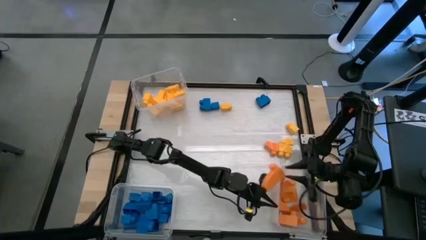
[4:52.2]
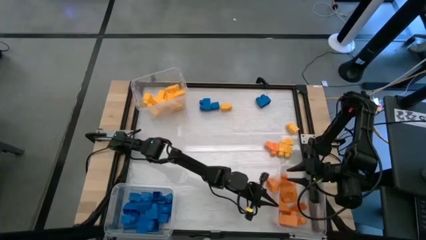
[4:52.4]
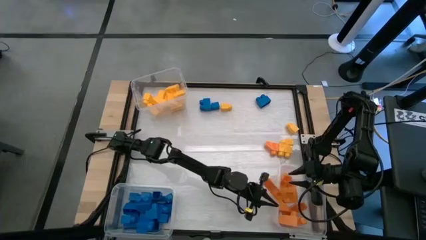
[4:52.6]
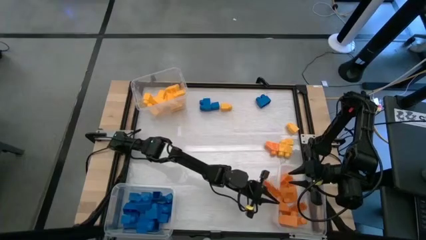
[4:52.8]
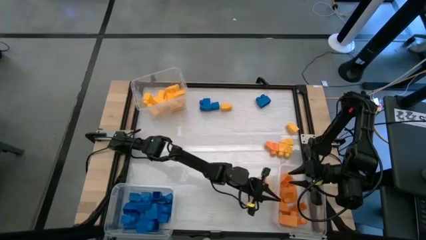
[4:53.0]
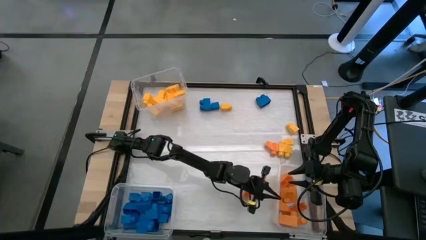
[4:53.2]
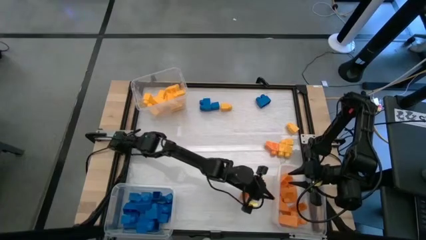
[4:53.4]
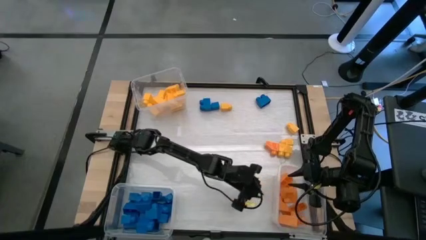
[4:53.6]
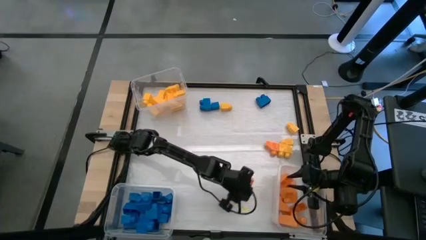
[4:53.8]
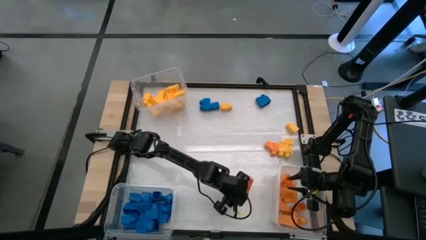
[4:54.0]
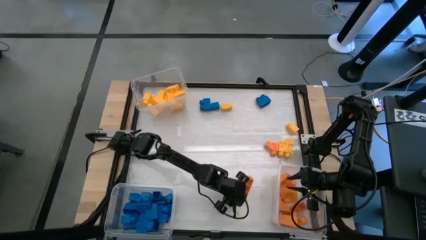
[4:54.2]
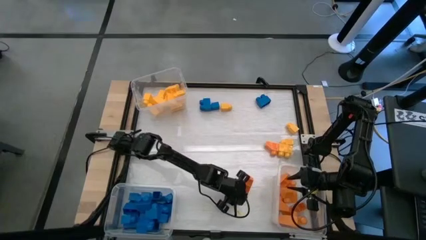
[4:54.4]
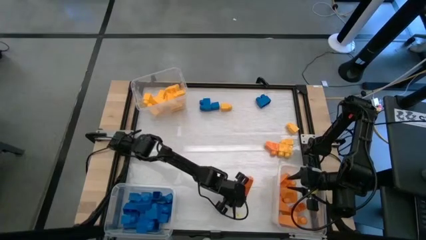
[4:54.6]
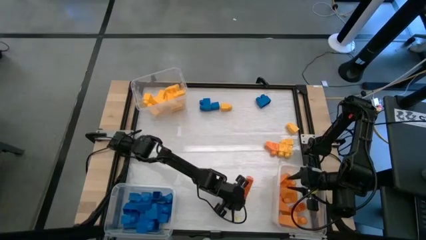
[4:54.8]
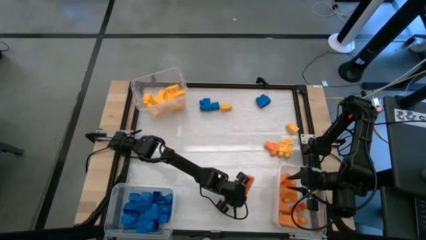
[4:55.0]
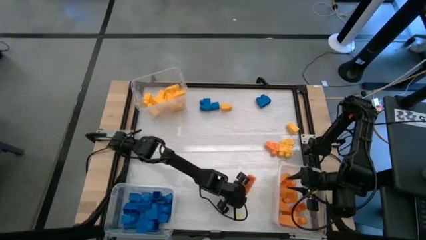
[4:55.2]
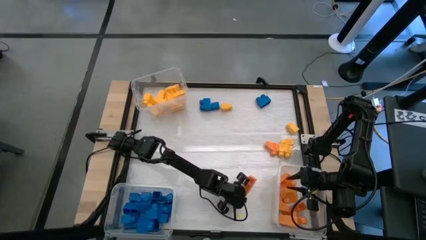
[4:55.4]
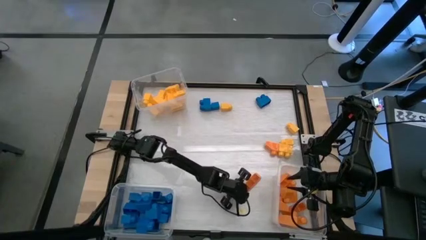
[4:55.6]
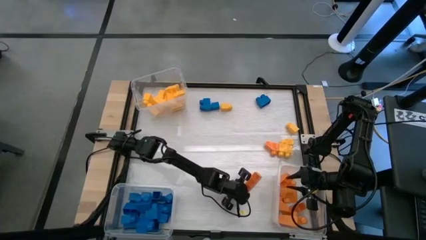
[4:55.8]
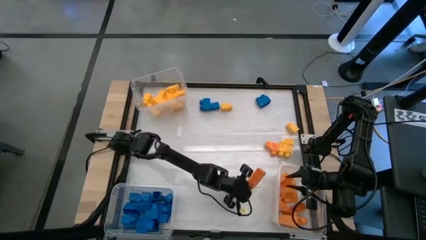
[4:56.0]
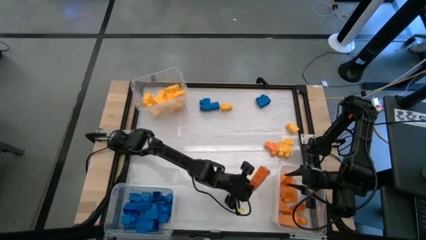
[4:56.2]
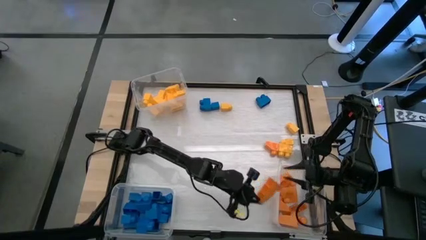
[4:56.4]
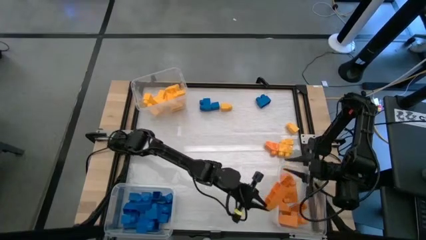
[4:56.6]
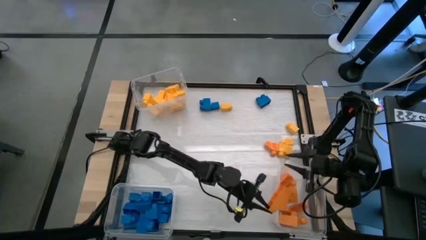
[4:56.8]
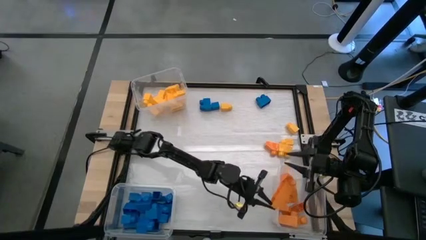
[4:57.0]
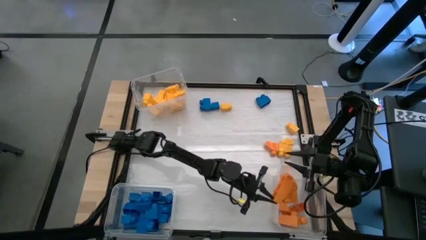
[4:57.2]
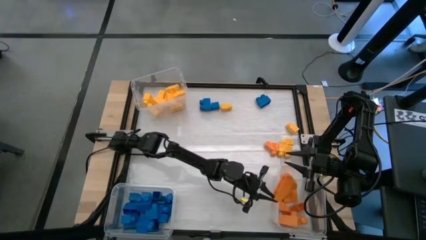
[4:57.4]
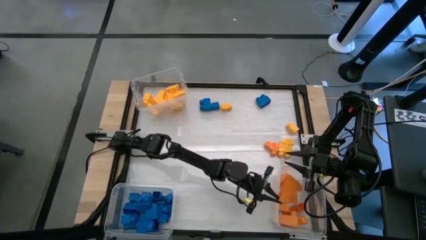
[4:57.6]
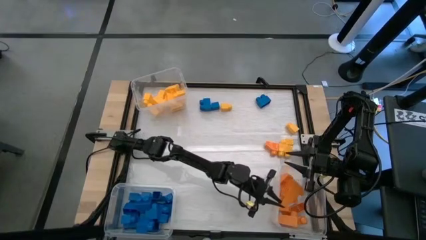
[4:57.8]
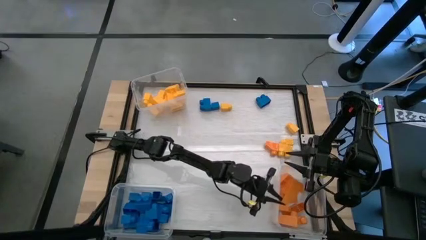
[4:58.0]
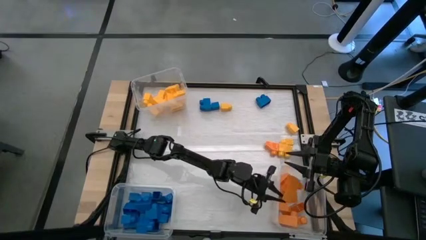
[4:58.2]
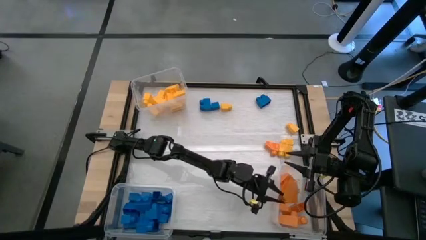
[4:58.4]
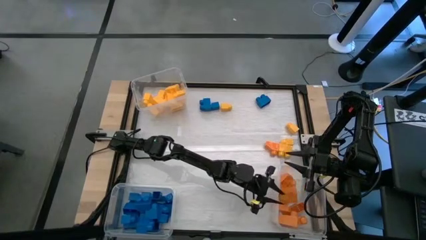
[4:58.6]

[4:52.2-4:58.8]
Task: Sort blocks
Put the orange game piece into the bottom right transparent bin

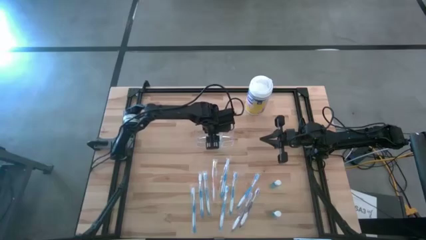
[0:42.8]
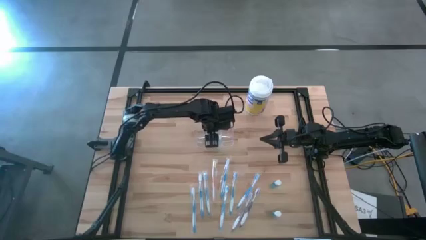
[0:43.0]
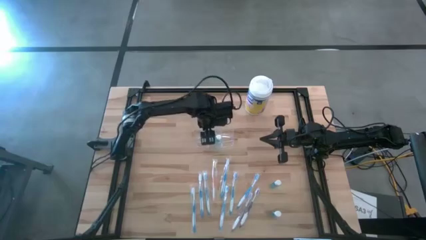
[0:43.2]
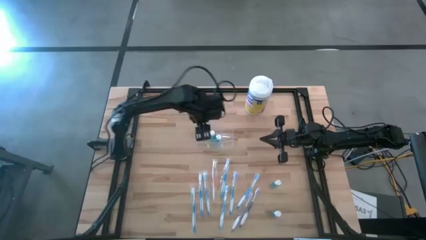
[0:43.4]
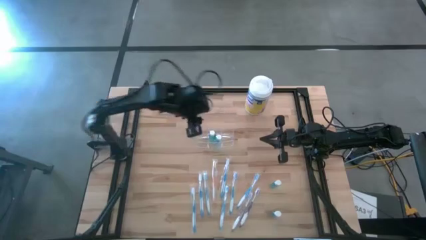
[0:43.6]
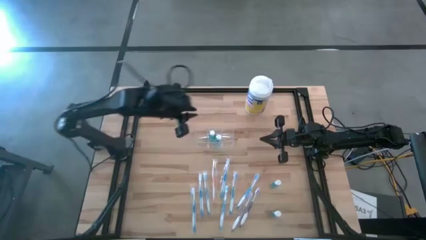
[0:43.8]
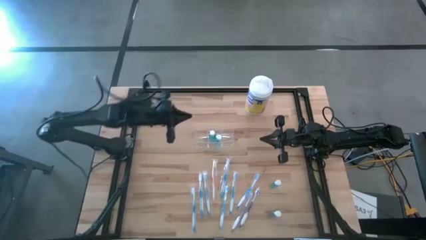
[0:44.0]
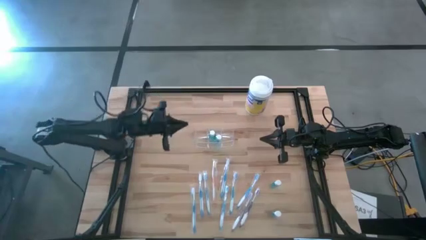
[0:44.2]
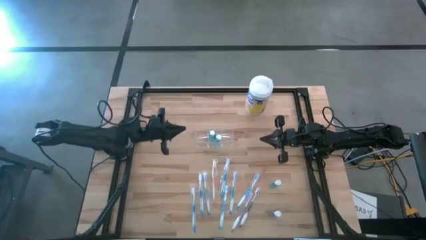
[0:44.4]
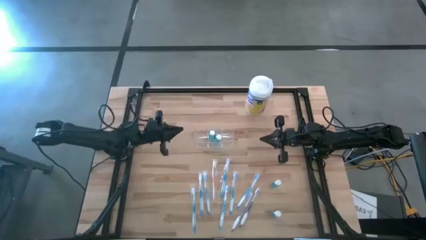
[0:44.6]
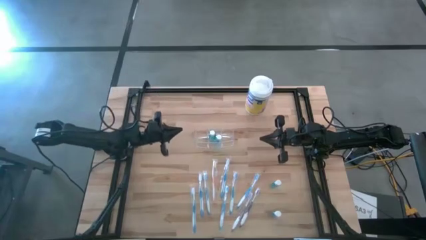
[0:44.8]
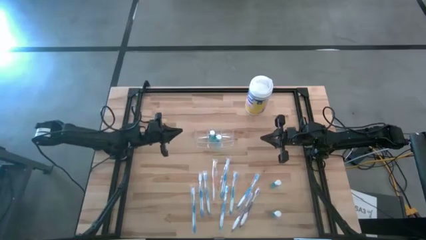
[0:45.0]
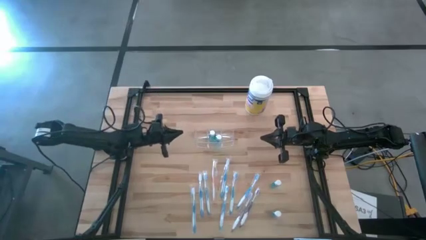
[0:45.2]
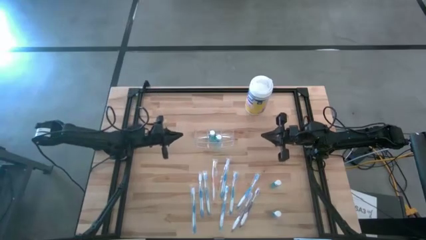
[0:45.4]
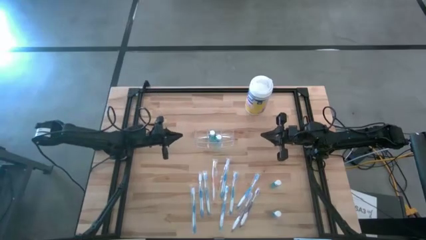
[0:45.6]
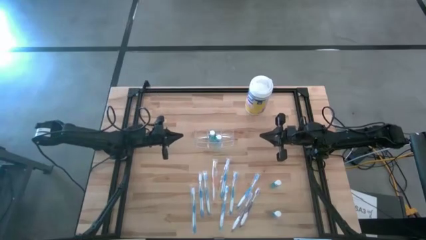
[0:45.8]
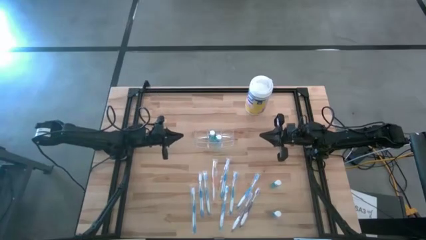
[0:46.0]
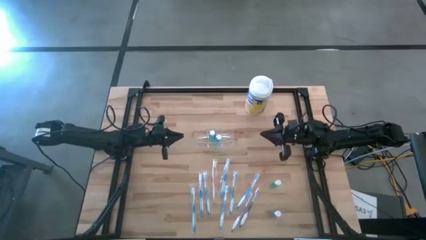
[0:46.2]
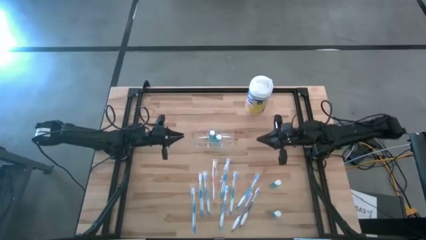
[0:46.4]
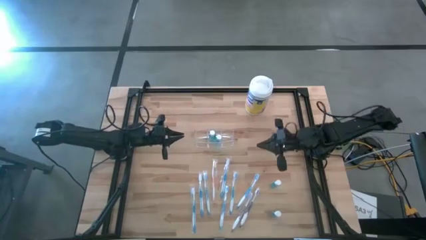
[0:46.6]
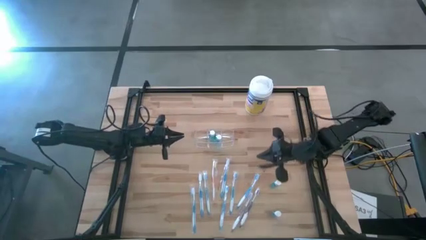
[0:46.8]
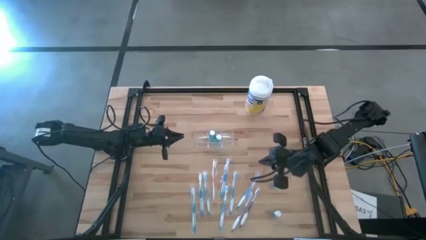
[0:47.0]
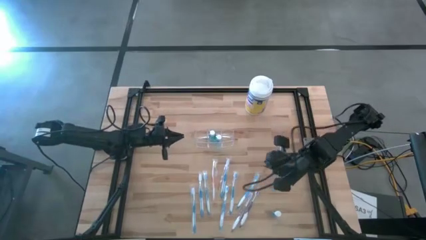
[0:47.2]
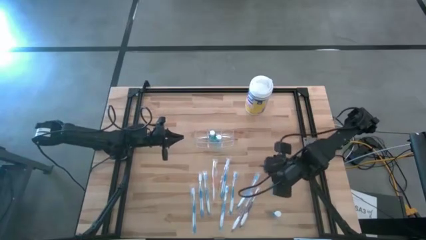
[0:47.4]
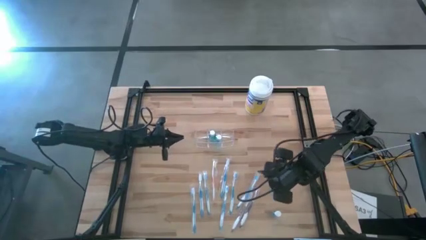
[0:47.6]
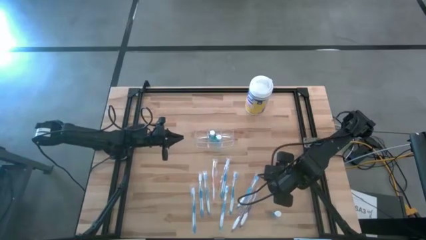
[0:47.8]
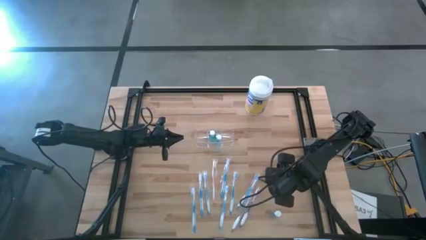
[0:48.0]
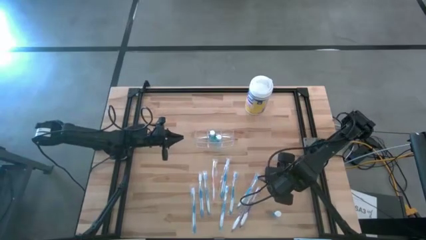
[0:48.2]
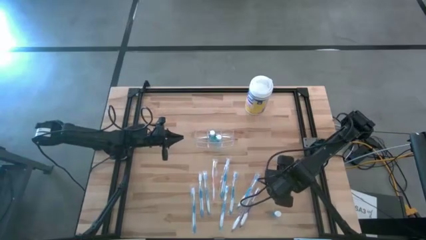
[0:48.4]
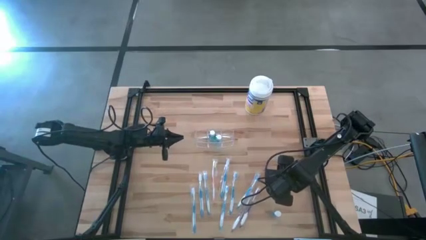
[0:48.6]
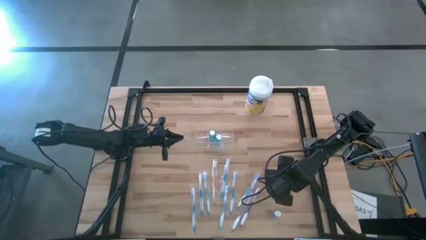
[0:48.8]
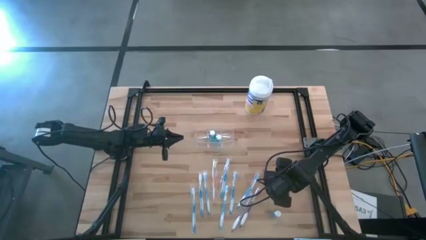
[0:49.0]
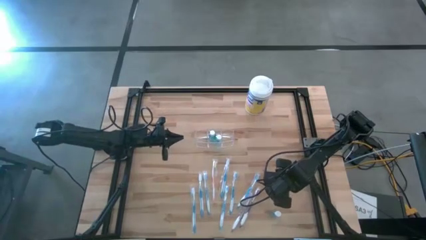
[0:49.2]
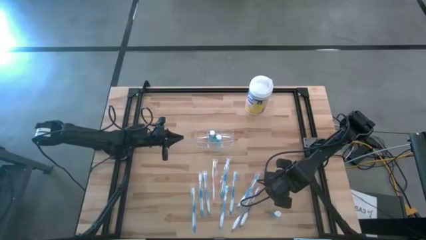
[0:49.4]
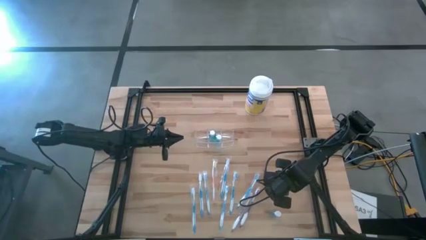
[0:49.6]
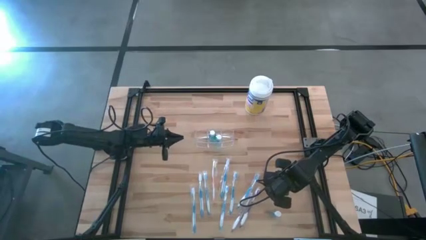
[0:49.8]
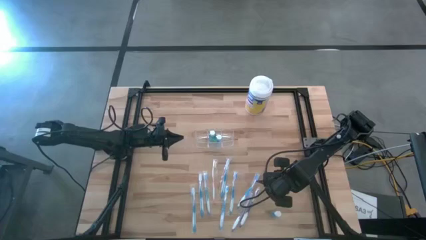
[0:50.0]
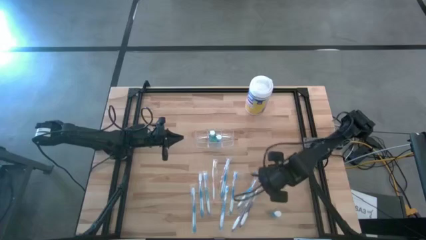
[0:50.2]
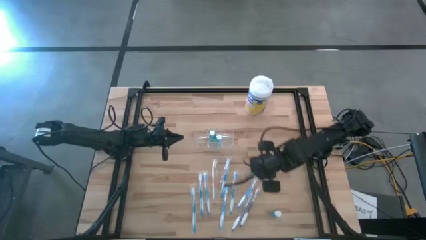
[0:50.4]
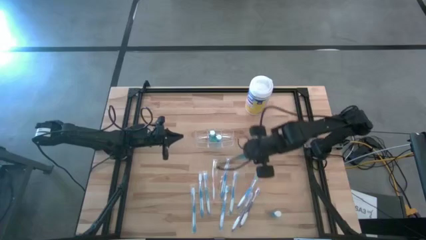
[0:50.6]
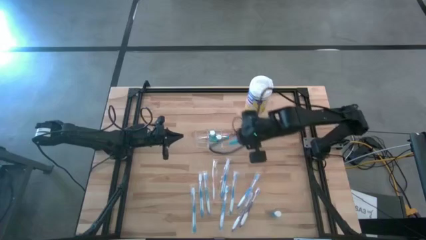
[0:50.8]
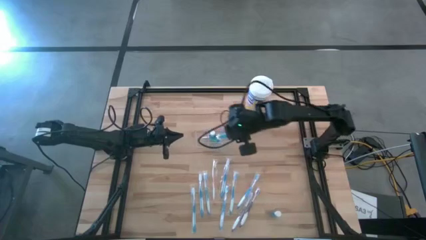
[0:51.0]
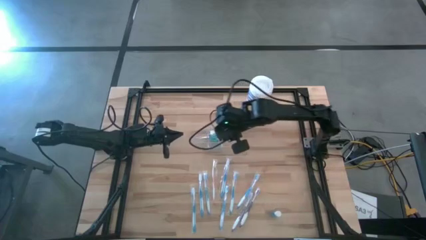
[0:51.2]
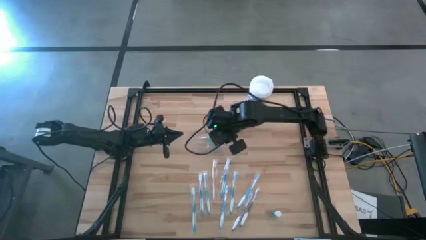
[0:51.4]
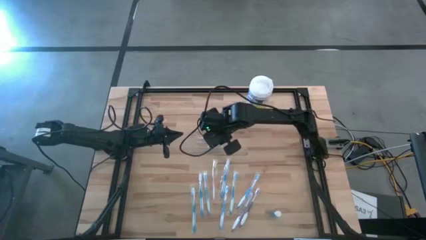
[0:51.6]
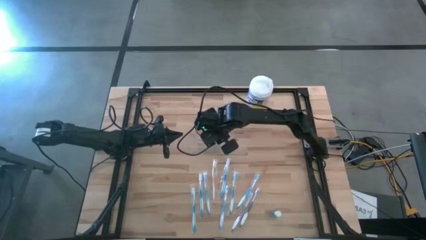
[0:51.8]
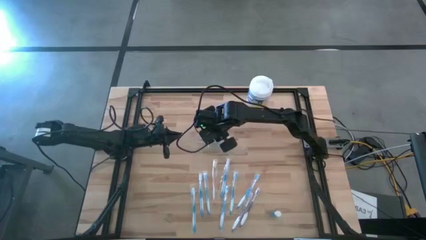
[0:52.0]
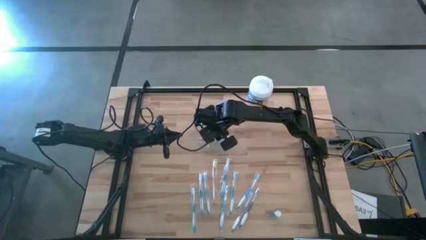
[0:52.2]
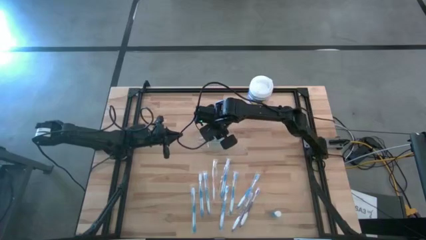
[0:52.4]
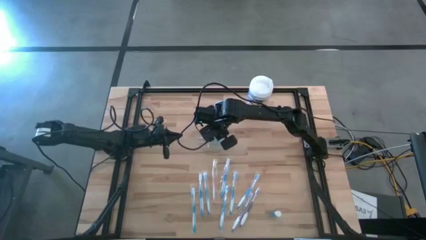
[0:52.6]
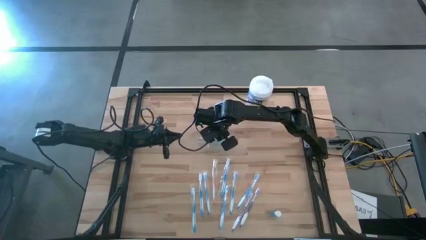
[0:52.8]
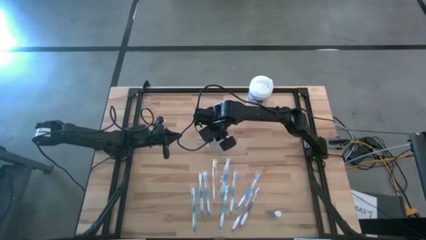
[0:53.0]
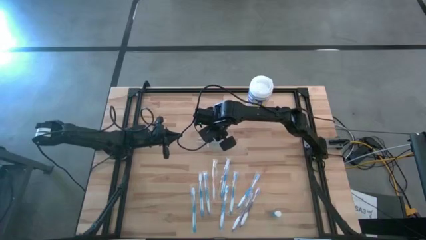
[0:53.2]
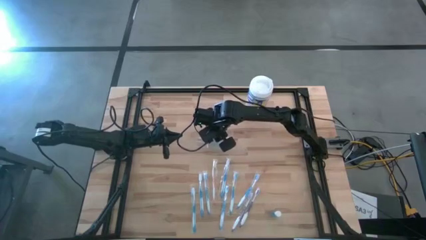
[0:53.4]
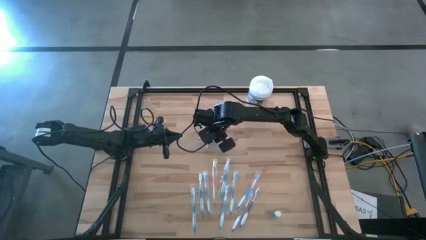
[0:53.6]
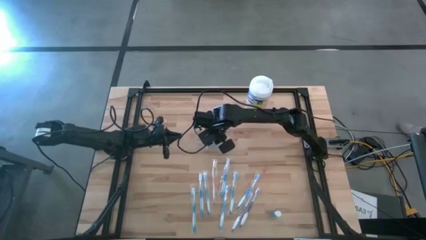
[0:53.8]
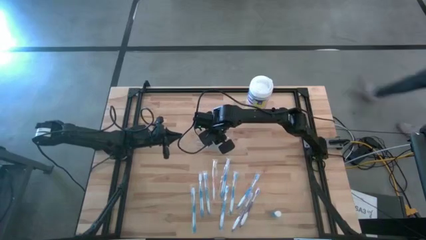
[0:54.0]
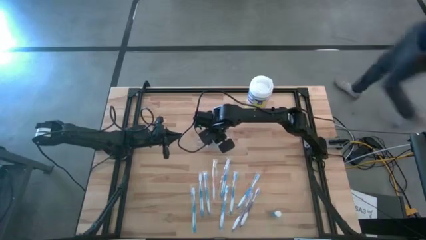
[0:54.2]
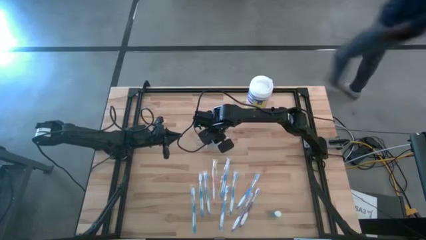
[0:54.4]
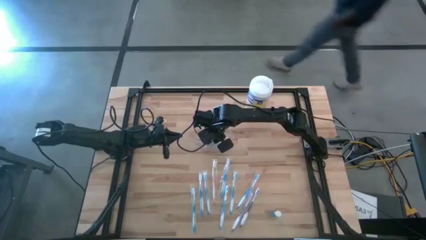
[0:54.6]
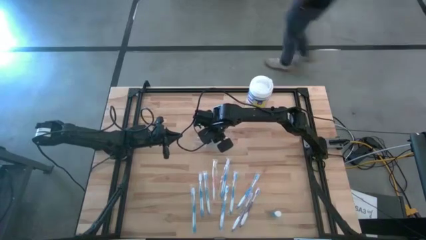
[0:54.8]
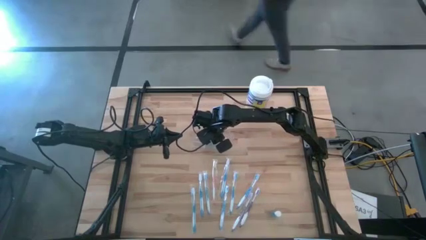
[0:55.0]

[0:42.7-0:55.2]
Task: Pick & Place toothbrushing station
Put the blue mouthwash into the transparent organizer
